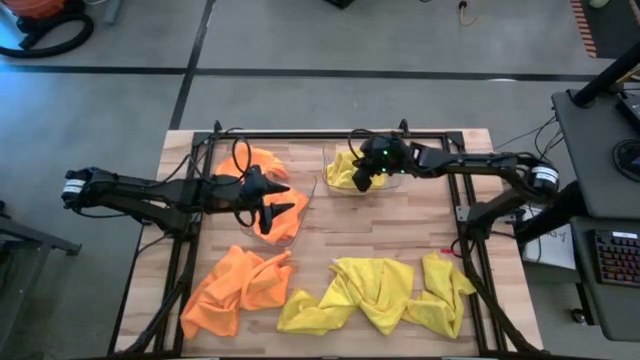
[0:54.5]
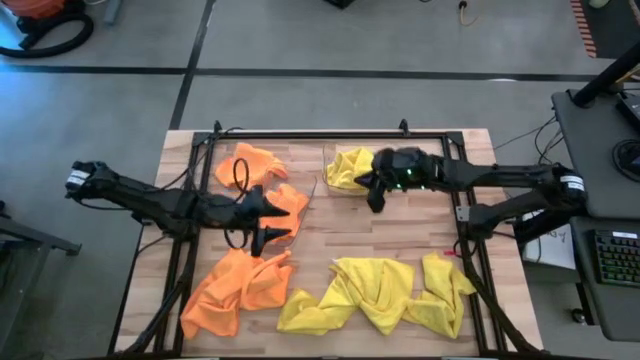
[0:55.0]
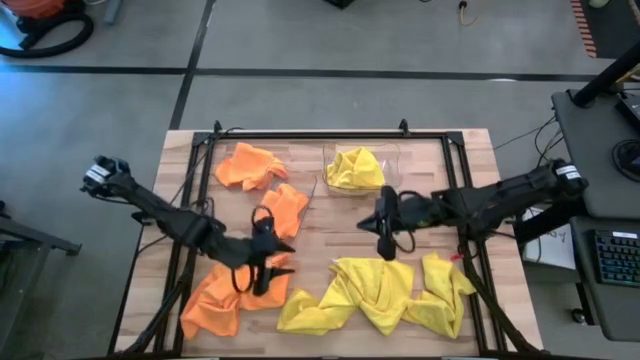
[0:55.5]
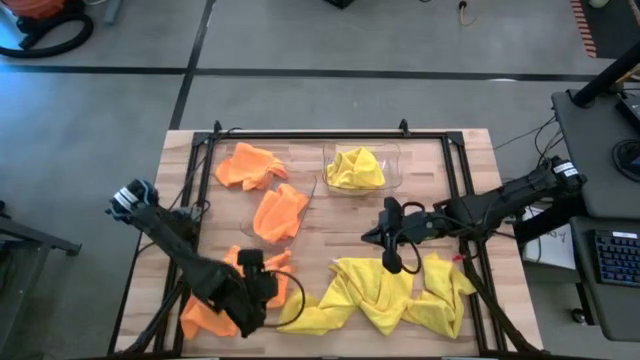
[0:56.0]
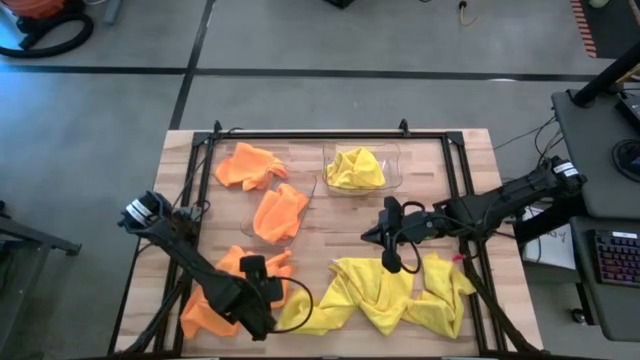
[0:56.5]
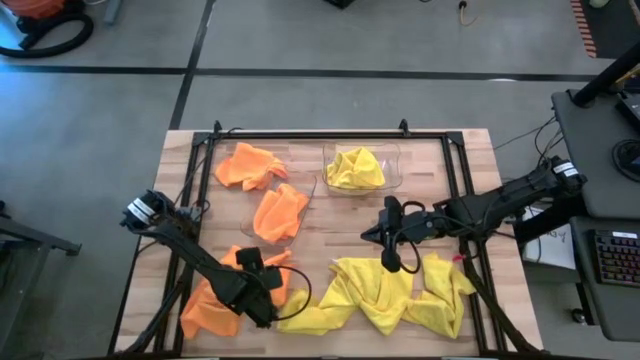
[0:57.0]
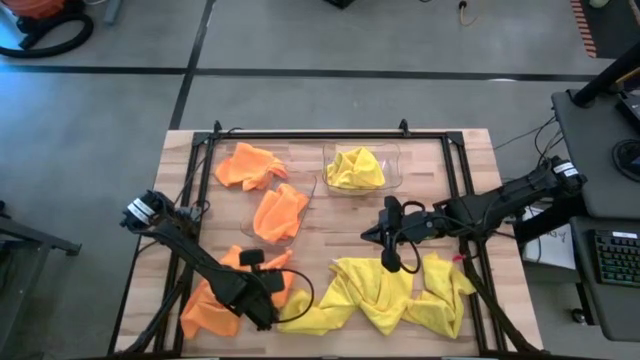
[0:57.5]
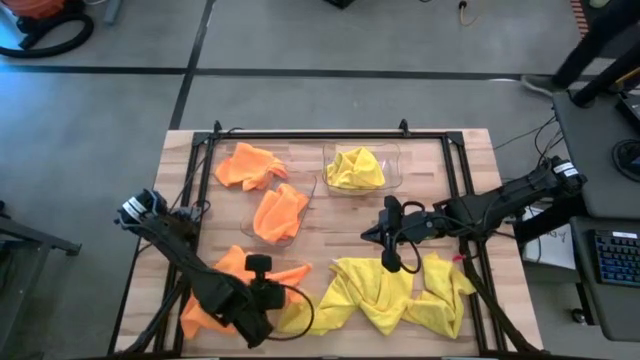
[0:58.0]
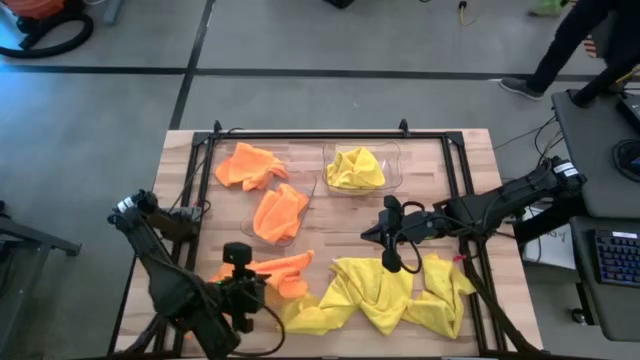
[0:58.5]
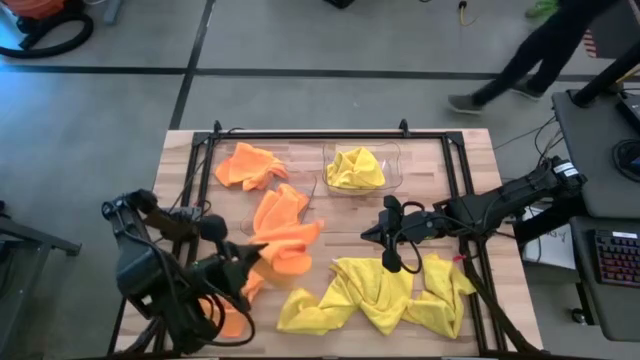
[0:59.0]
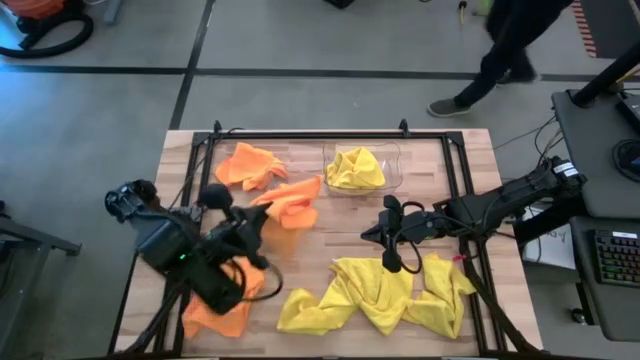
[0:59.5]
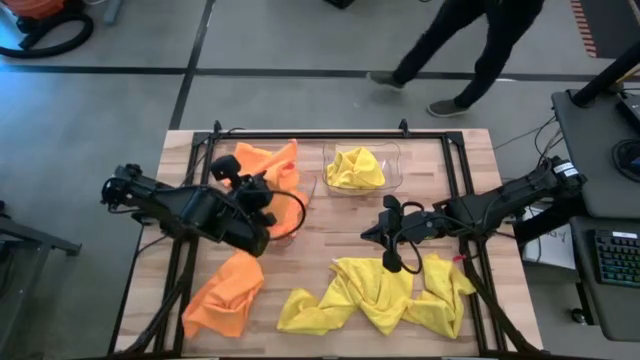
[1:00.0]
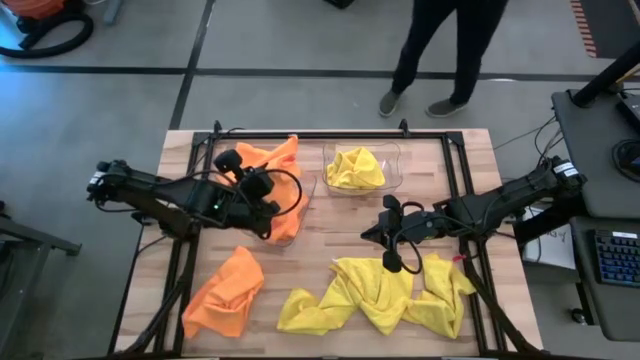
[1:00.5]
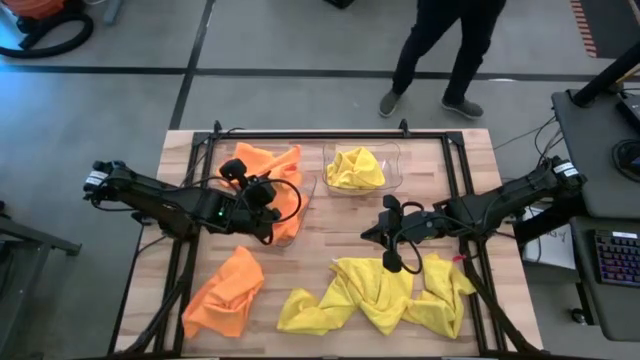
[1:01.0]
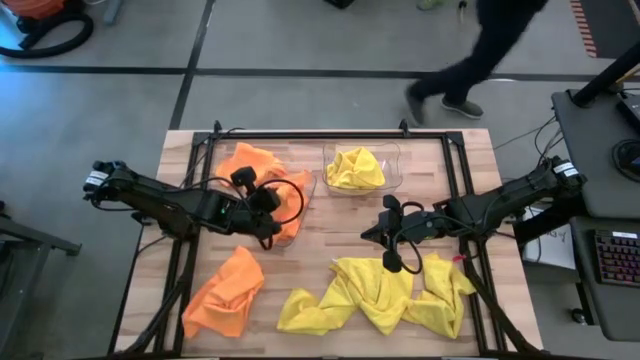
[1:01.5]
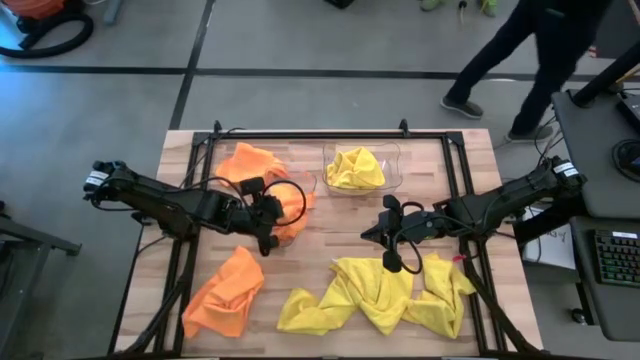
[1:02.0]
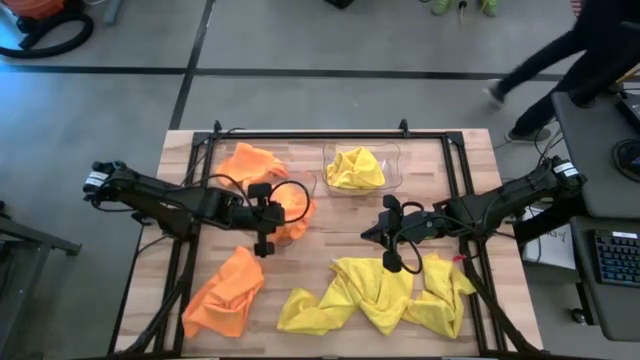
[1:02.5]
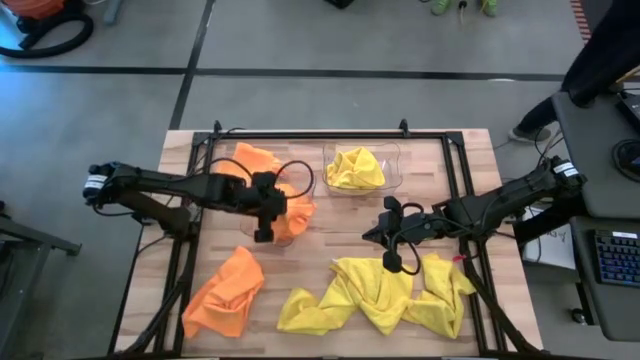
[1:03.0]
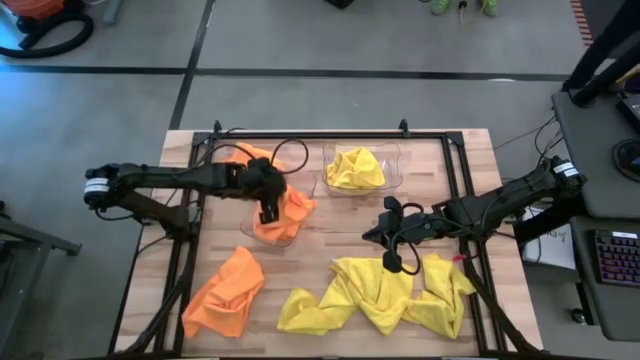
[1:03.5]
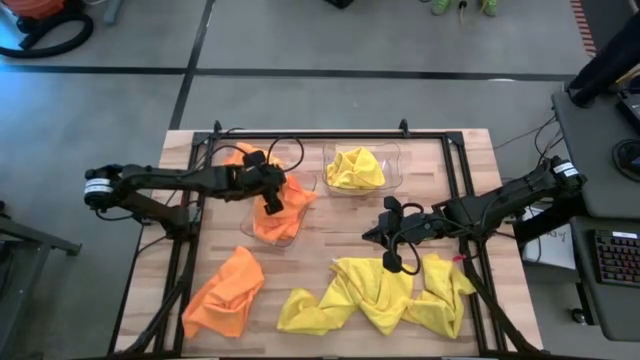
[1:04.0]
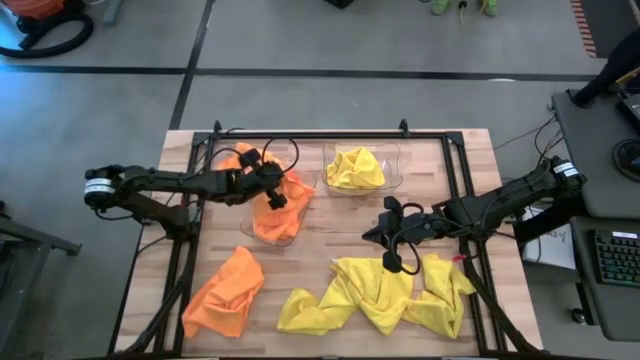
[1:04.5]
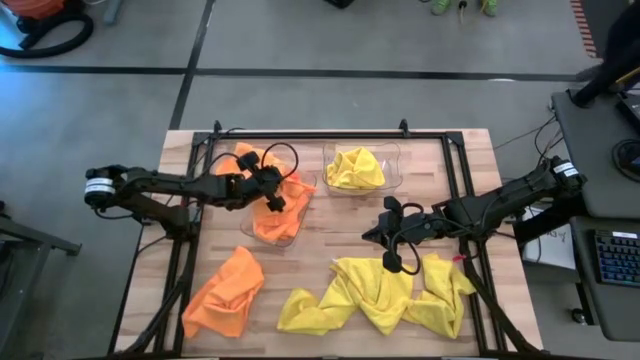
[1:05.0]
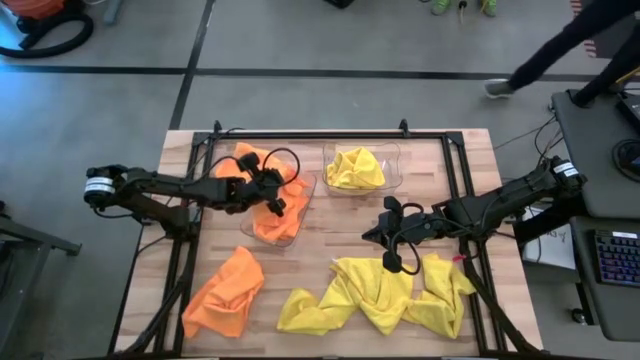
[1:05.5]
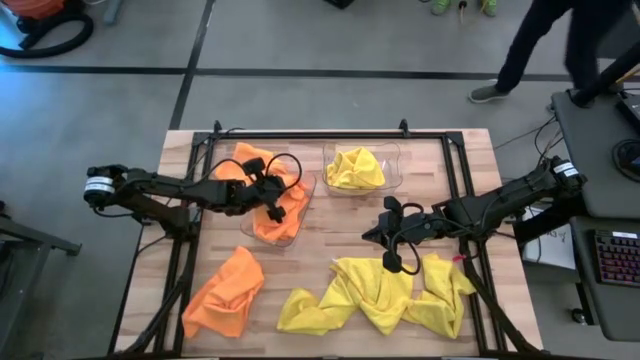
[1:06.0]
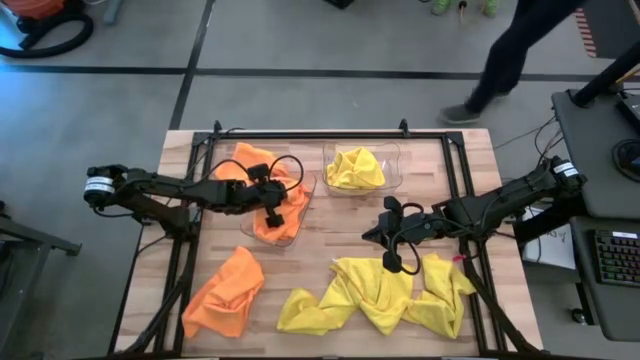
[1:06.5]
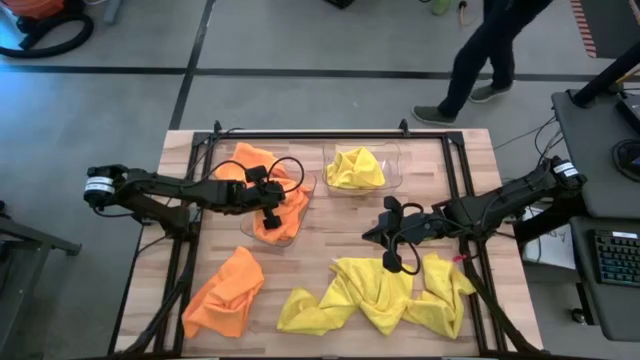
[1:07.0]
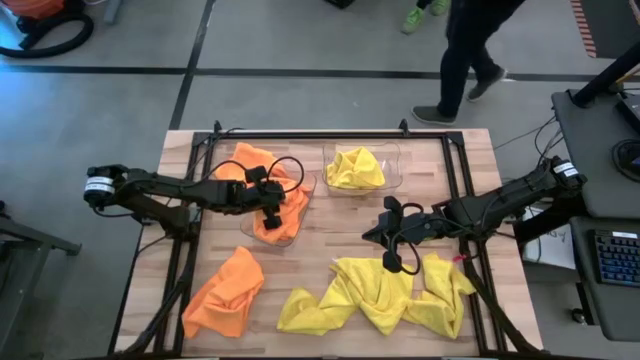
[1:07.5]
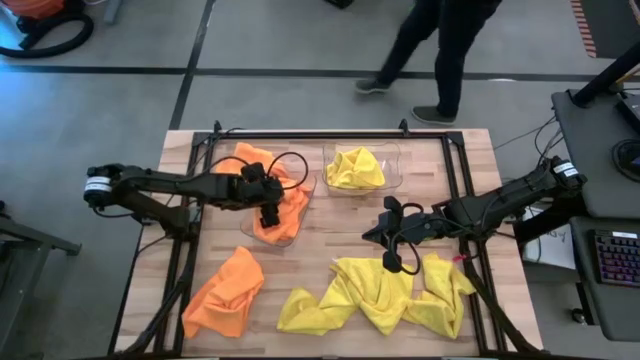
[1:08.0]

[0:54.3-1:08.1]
Task: Sort microfiber towel by color & place in baskets
Put the orange microfiber towel into the left transparent bin

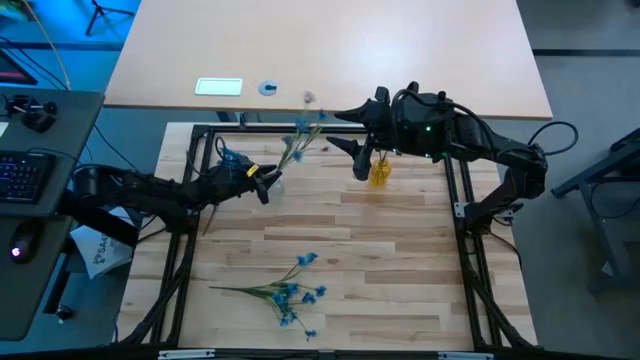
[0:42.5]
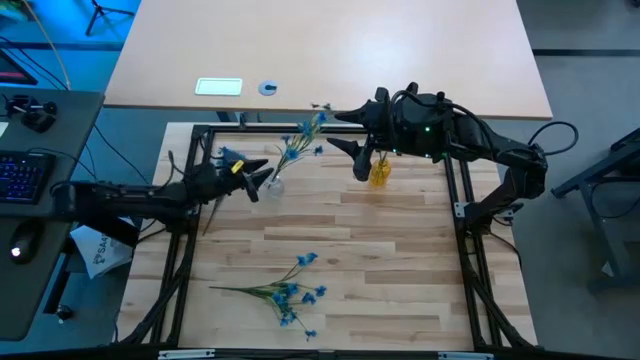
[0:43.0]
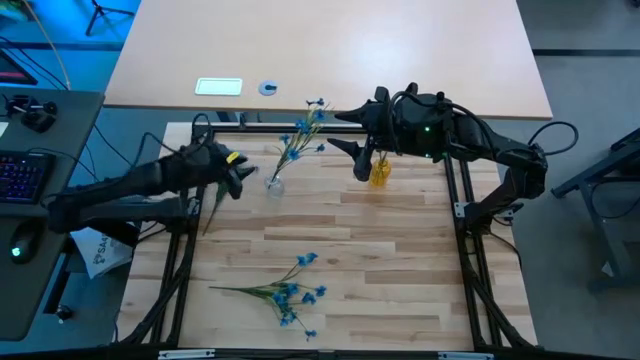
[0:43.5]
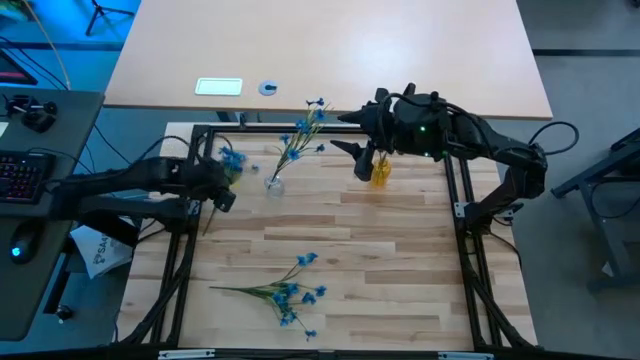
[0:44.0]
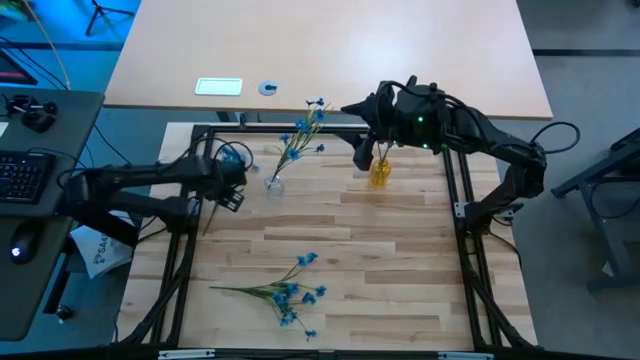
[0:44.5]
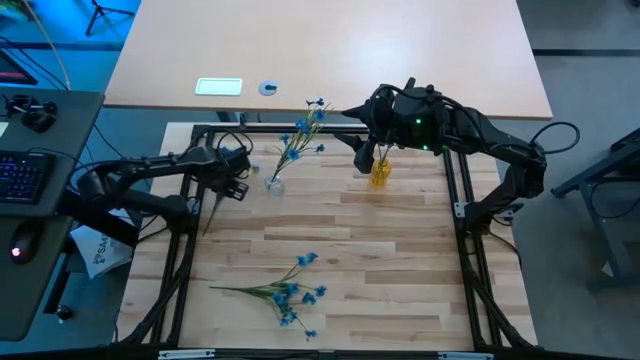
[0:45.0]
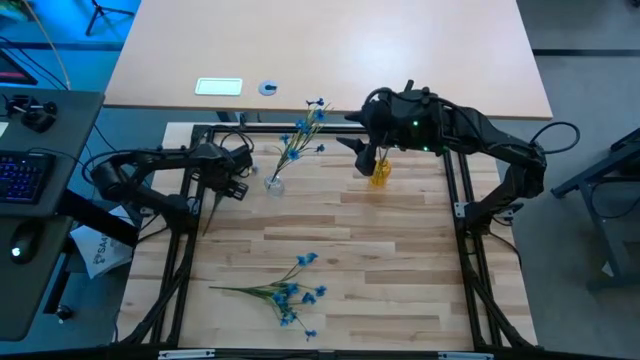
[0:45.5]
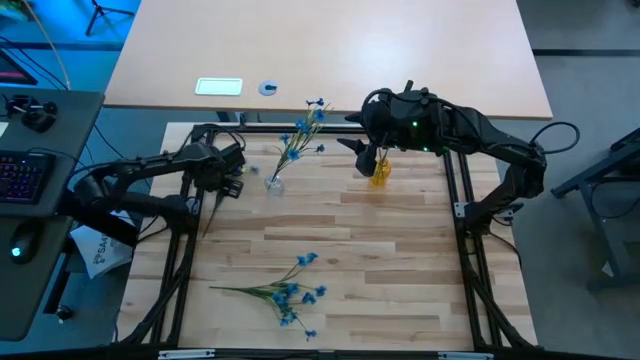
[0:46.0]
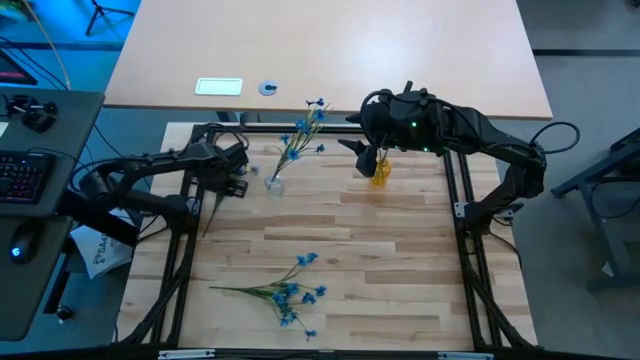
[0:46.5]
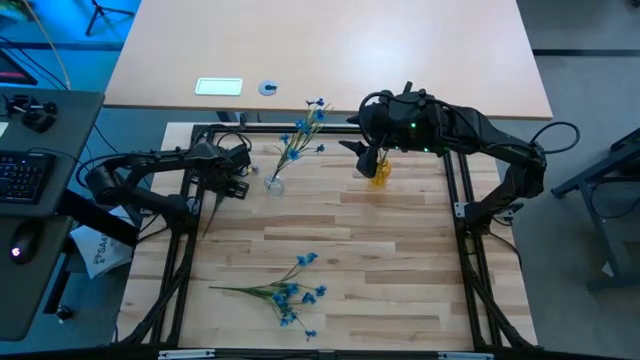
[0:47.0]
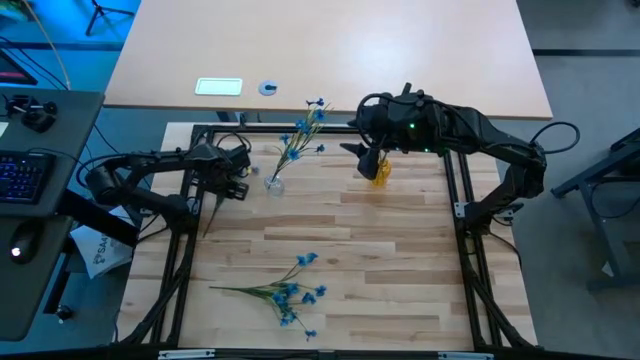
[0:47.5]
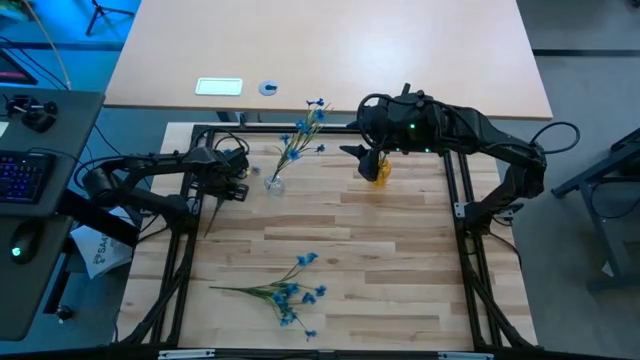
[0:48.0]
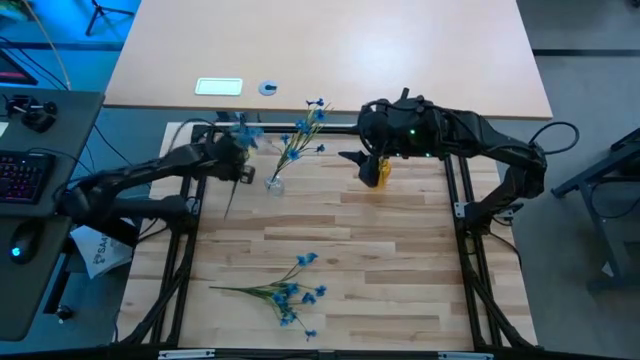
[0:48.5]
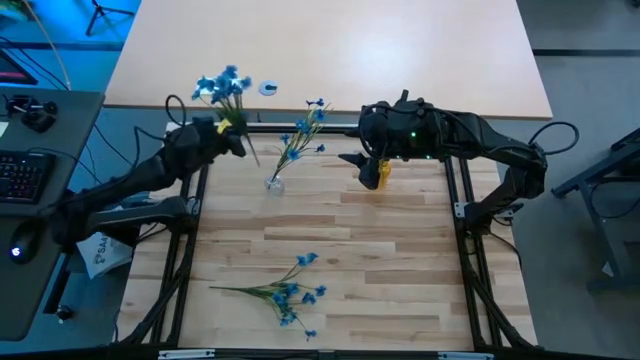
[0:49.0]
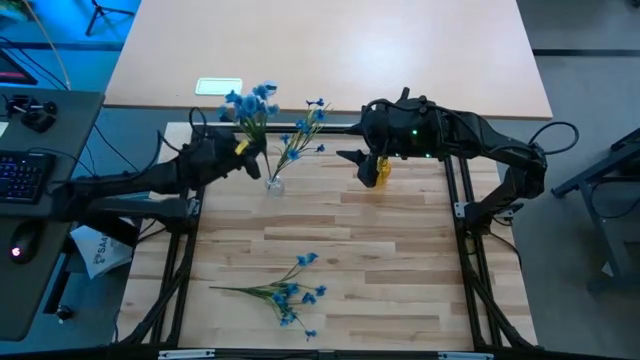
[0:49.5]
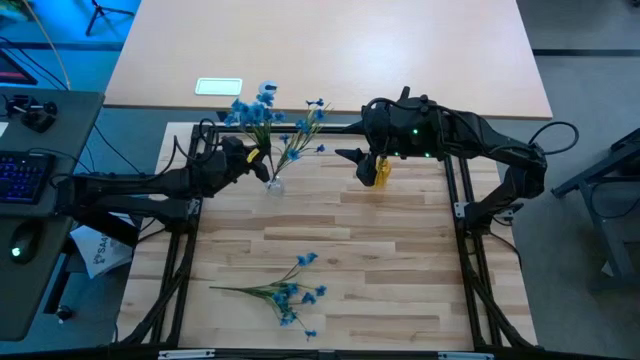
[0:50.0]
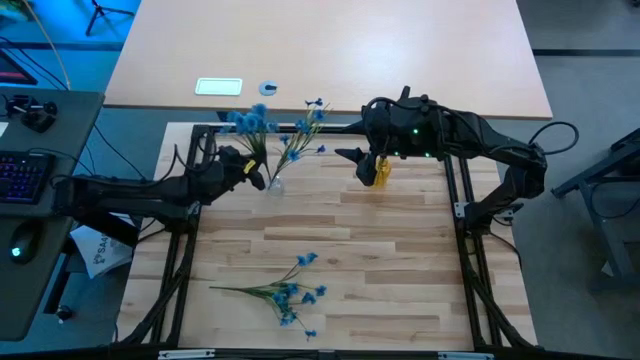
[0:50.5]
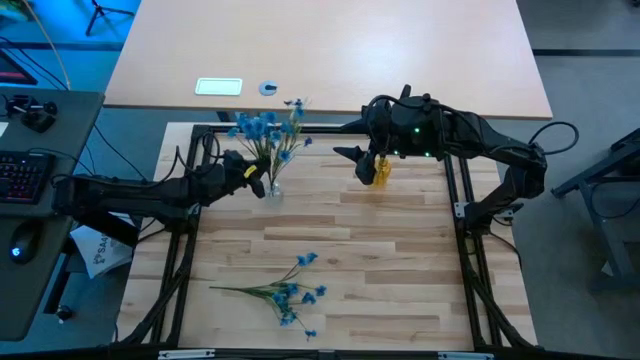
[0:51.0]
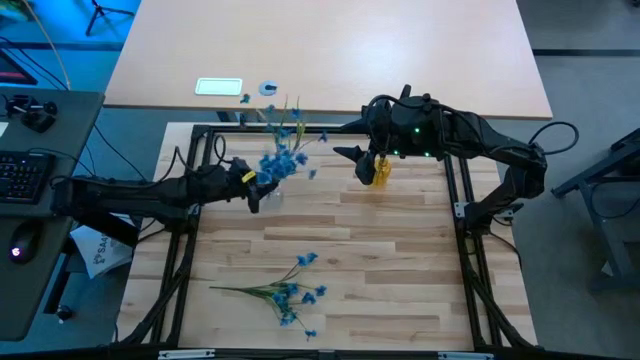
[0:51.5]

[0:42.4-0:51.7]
Task: Sort flowers into vase by color
Put the top blue flowers into the transparent crystal vase
